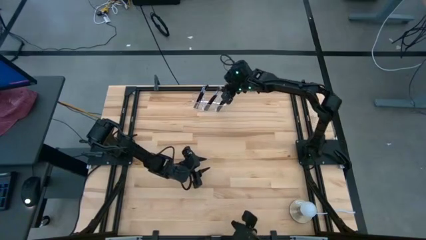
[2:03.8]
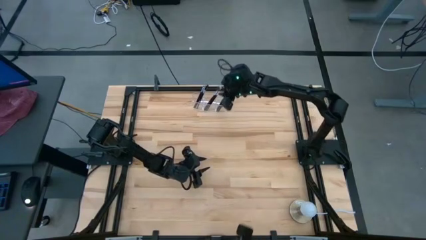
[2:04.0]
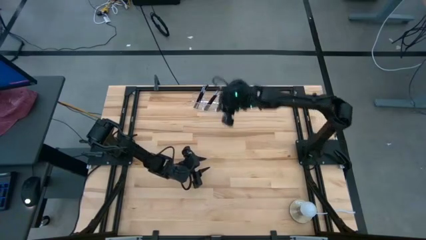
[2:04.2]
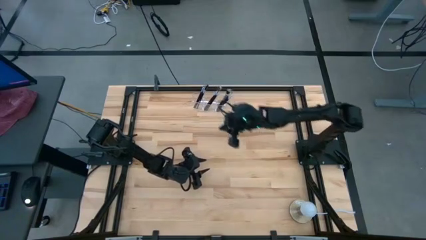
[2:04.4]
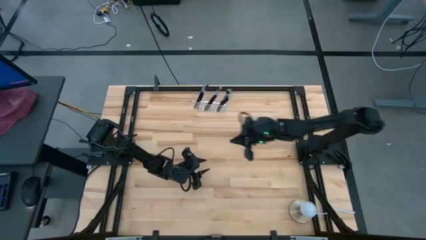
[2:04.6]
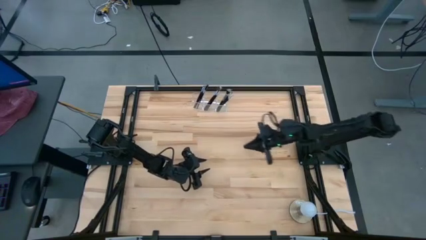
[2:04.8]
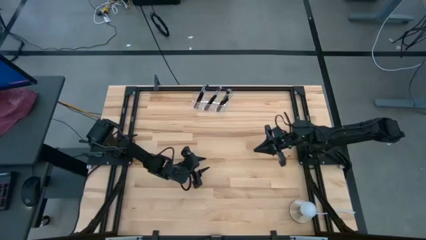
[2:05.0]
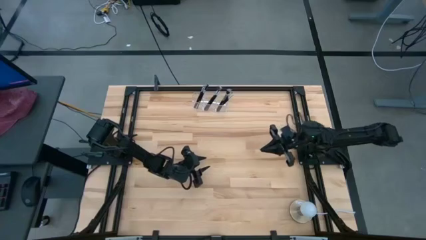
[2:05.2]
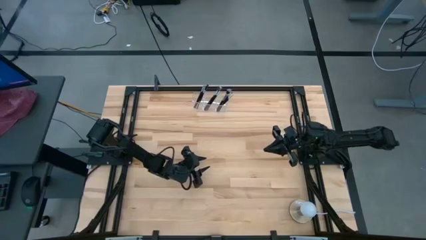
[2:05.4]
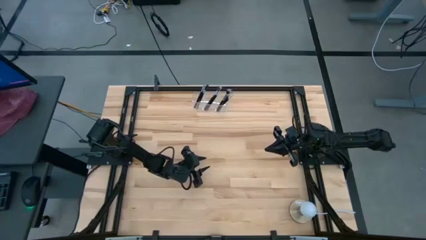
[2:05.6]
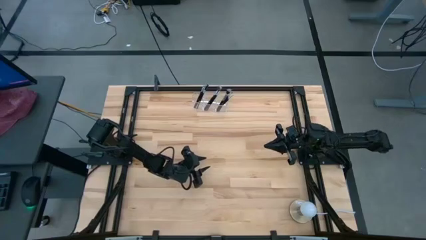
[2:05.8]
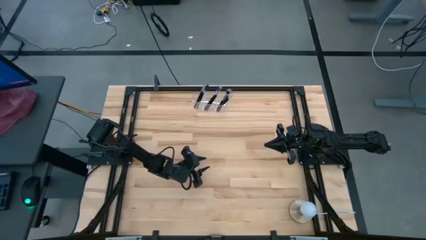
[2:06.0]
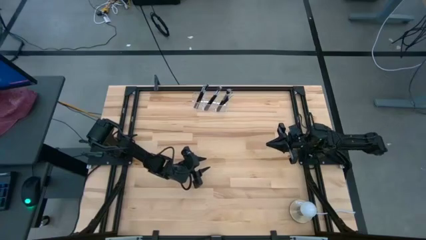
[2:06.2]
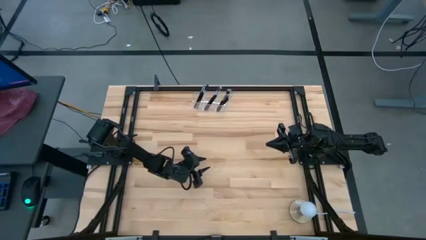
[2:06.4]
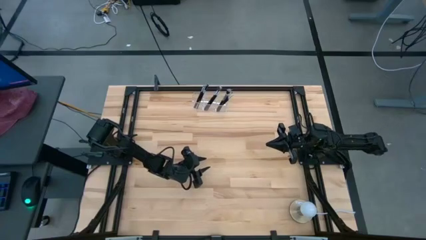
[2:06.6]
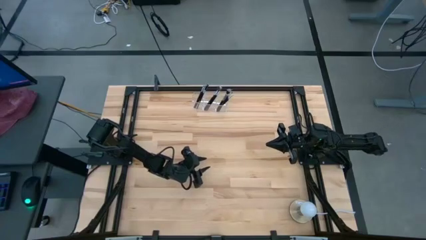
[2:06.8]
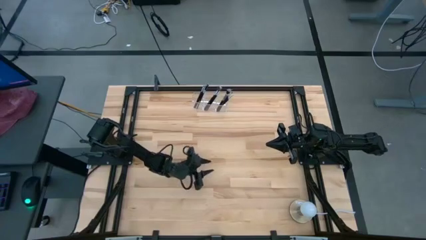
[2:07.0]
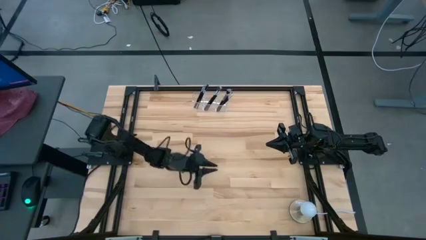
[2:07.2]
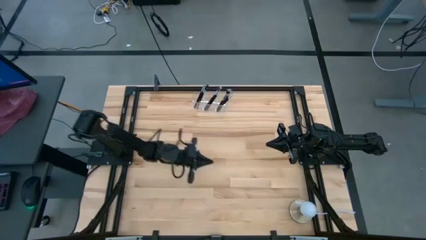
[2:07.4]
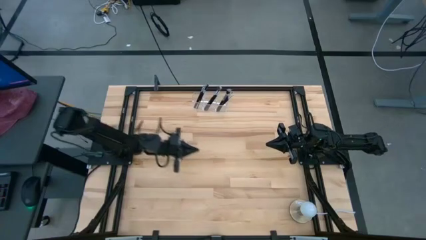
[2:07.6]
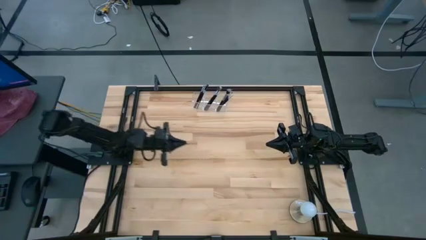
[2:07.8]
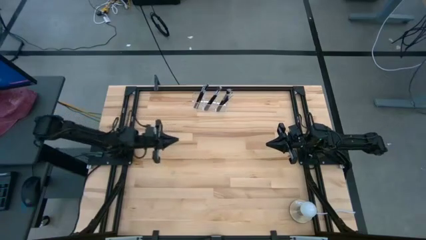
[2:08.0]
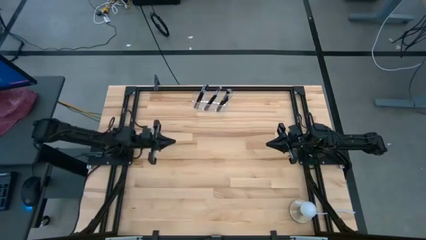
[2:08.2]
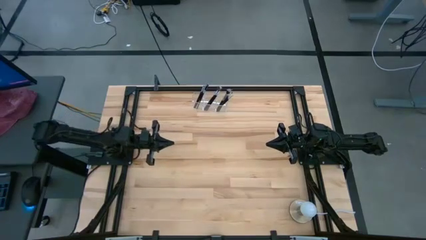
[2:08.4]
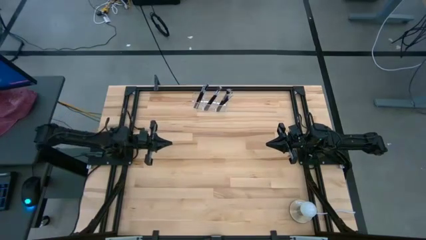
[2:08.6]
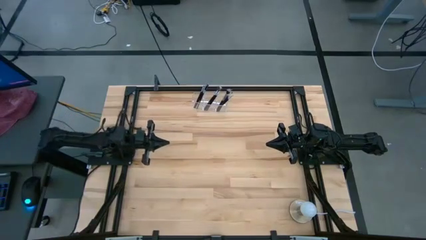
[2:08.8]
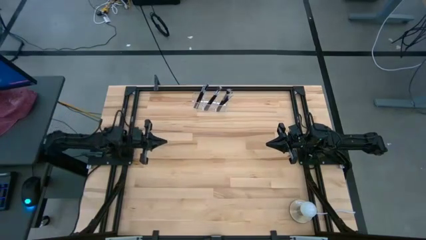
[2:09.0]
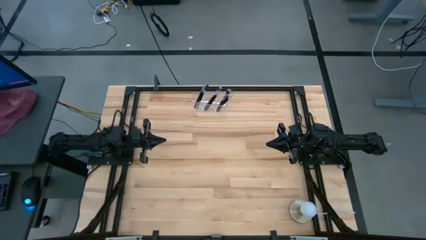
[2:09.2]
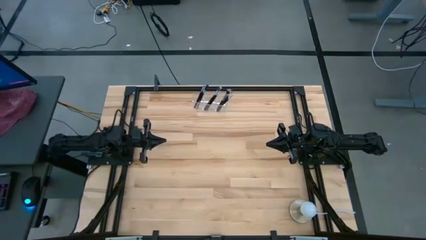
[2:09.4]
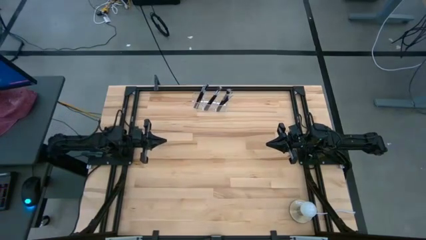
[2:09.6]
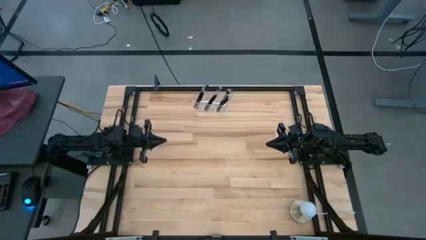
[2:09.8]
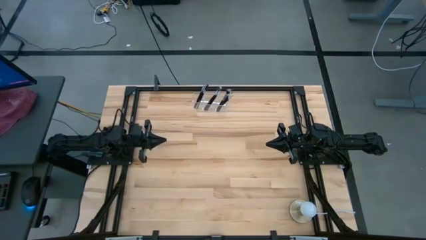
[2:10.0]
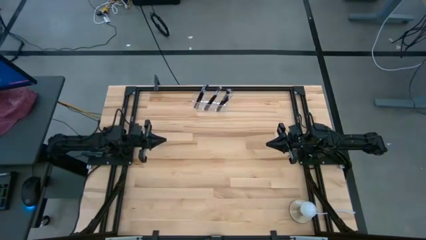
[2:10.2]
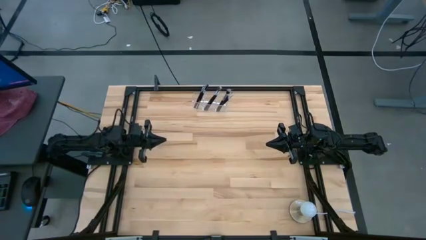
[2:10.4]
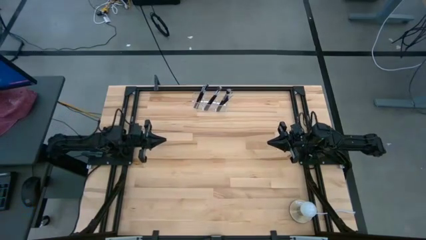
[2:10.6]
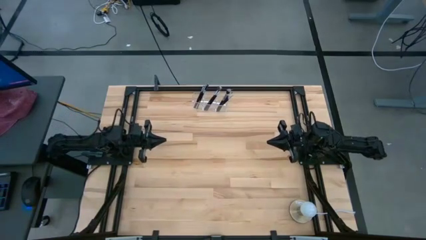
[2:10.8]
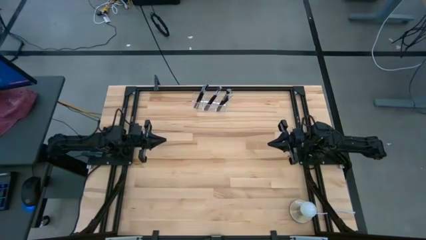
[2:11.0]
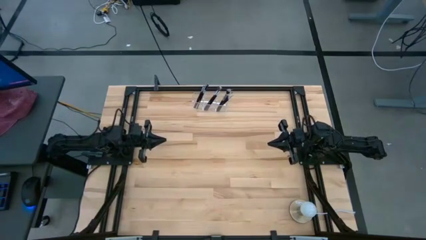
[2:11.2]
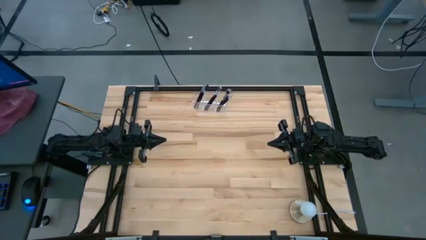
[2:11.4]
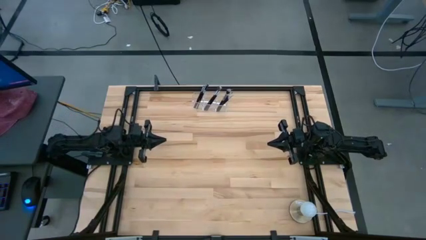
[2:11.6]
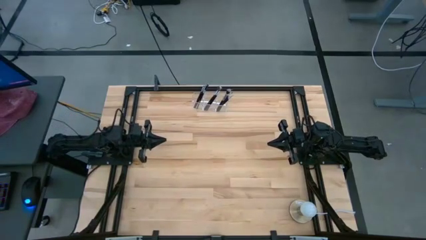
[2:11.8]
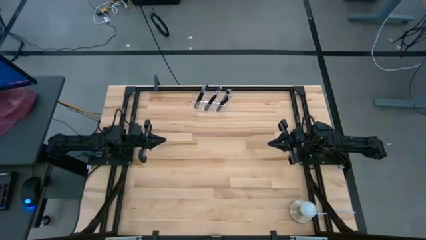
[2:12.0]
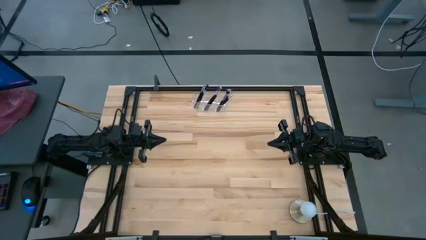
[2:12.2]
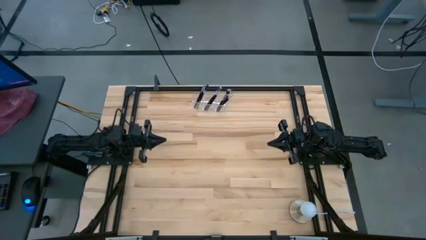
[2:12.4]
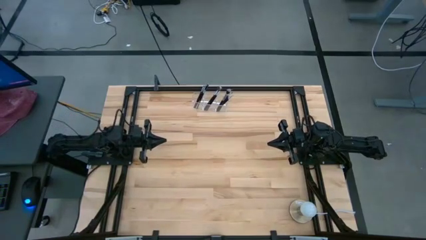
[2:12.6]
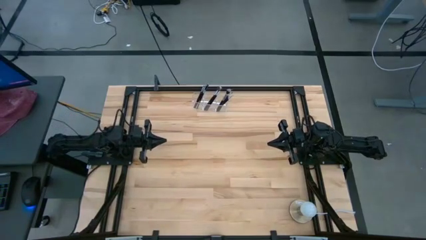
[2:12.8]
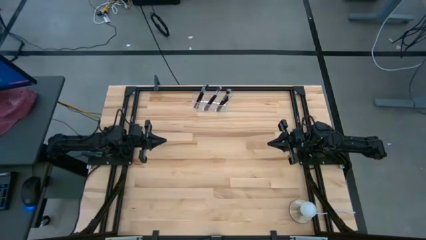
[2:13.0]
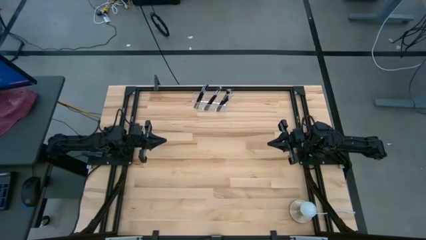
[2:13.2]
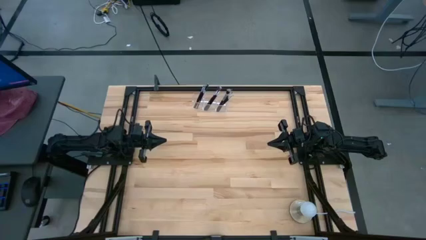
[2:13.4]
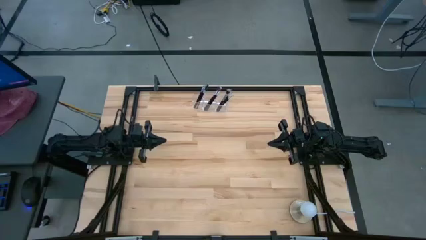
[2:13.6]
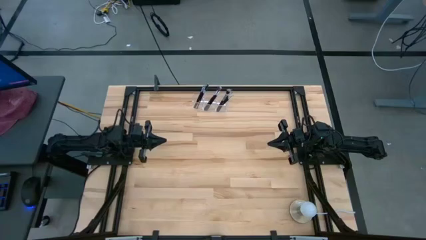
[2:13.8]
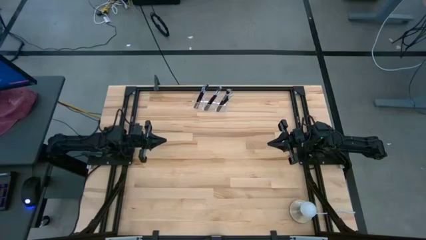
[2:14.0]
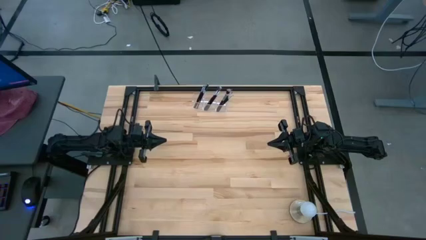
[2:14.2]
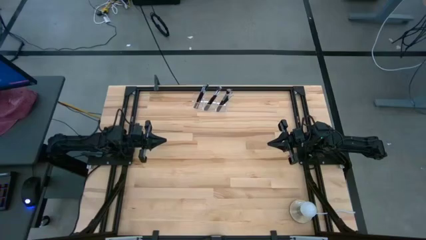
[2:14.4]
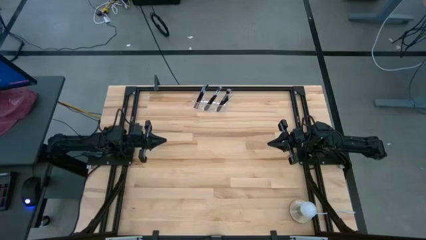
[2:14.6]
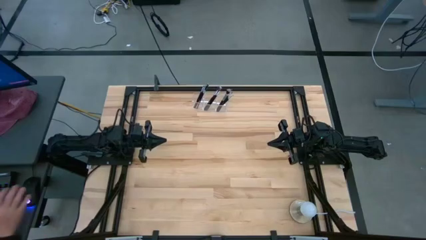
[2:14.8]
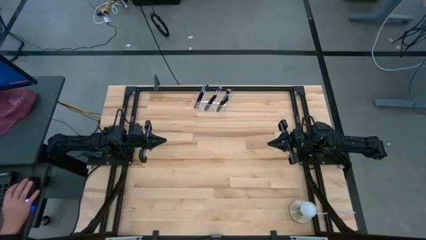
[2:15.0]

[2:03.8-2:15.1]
Task: Put items in baskets/containers
Return to Home Position

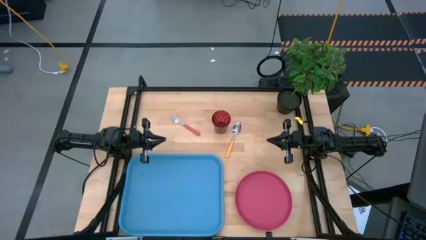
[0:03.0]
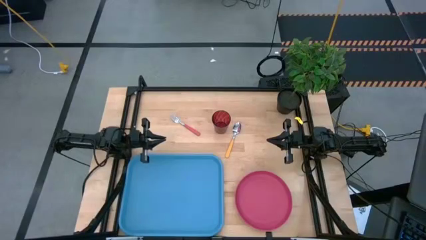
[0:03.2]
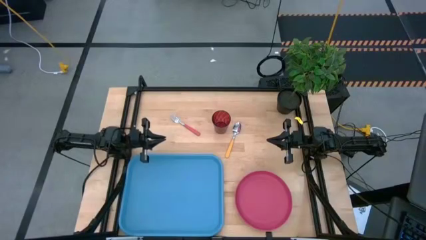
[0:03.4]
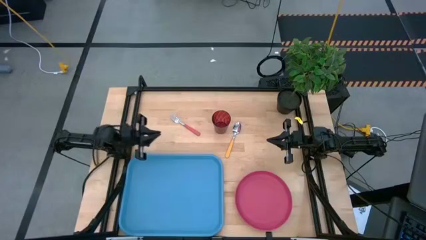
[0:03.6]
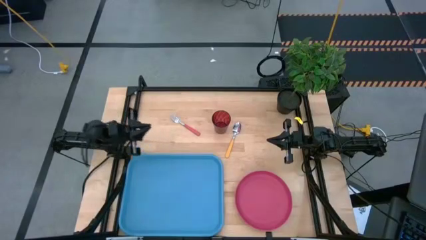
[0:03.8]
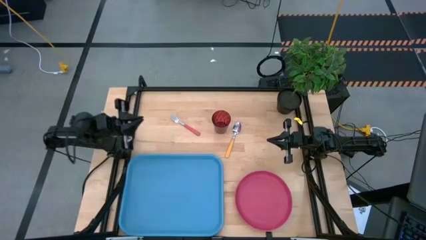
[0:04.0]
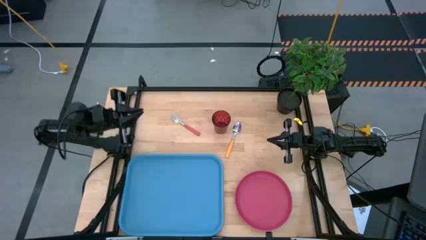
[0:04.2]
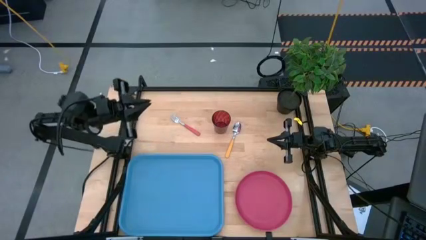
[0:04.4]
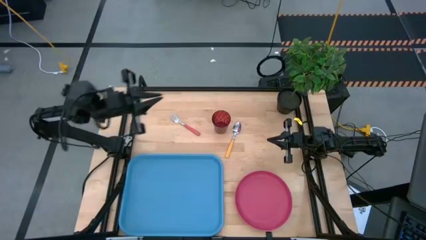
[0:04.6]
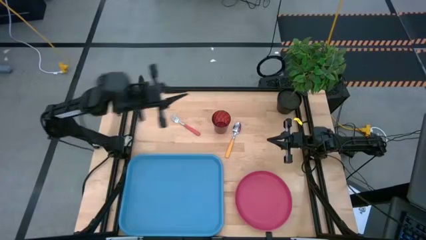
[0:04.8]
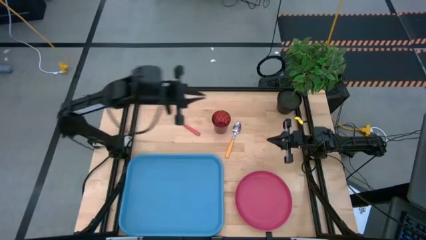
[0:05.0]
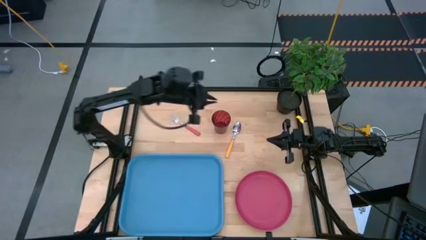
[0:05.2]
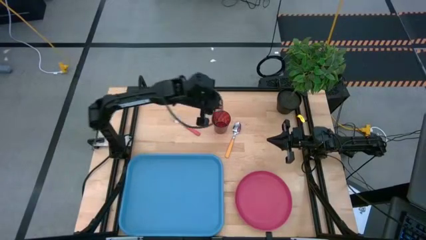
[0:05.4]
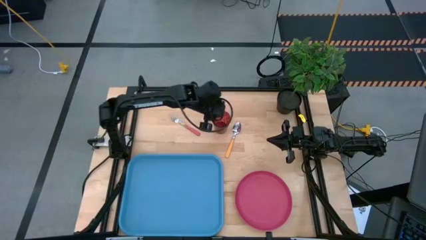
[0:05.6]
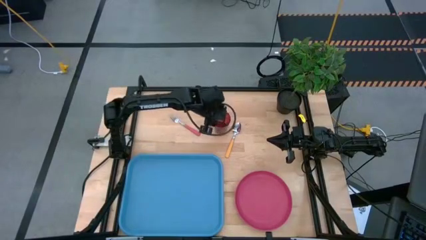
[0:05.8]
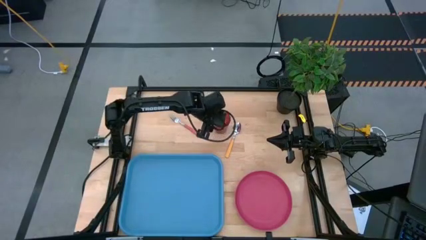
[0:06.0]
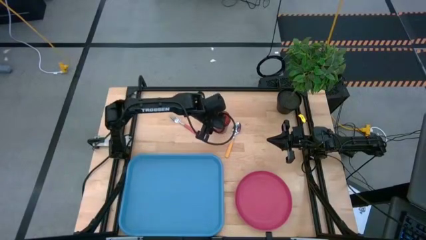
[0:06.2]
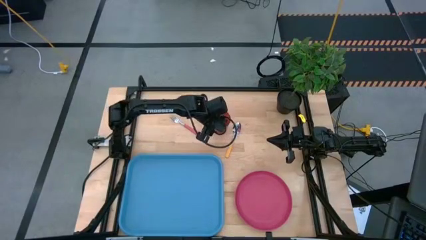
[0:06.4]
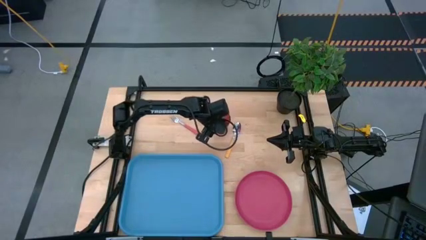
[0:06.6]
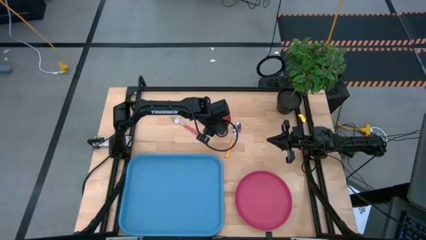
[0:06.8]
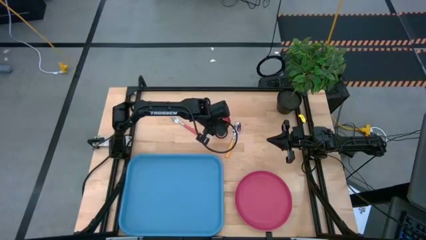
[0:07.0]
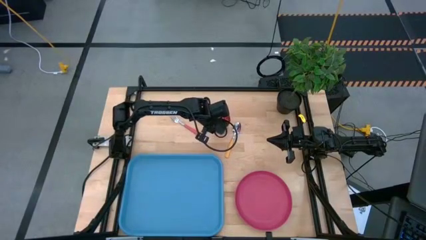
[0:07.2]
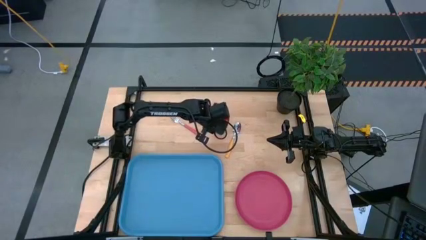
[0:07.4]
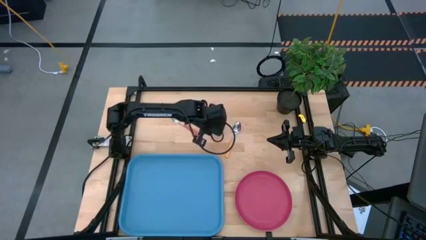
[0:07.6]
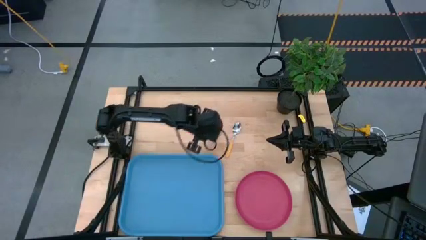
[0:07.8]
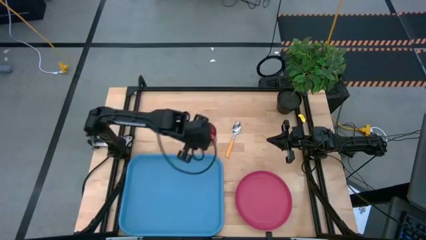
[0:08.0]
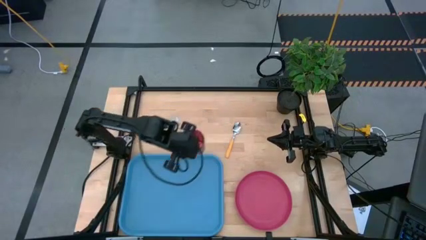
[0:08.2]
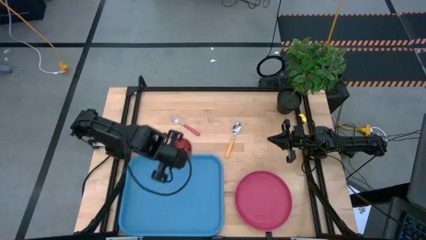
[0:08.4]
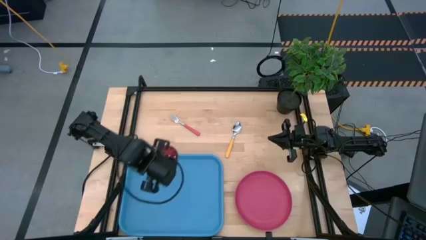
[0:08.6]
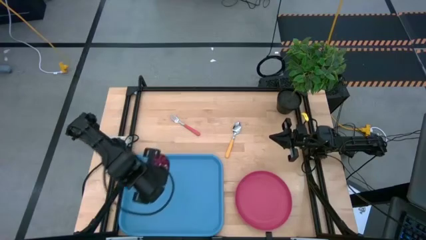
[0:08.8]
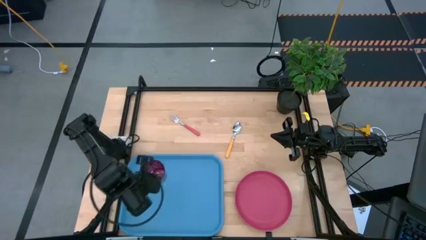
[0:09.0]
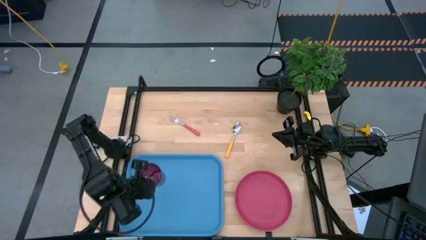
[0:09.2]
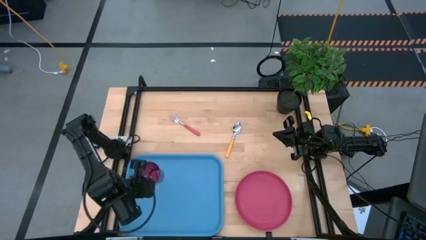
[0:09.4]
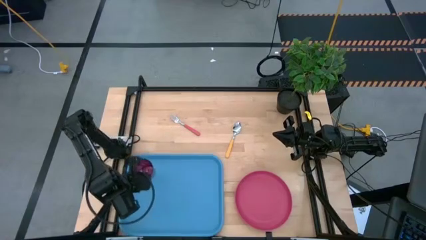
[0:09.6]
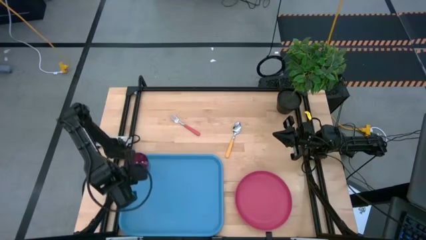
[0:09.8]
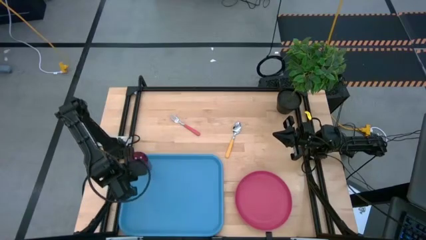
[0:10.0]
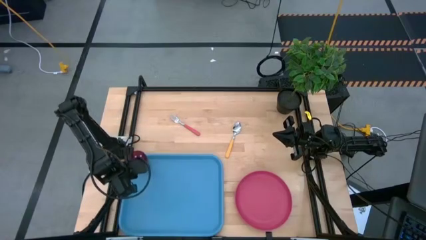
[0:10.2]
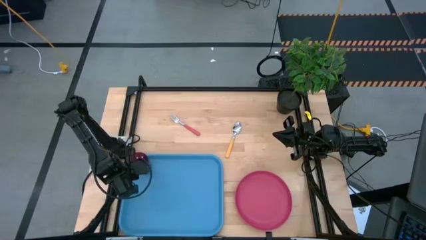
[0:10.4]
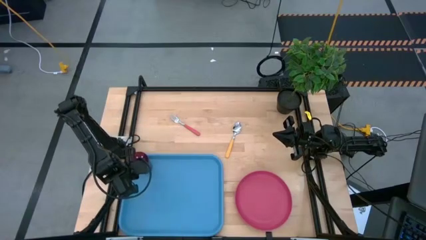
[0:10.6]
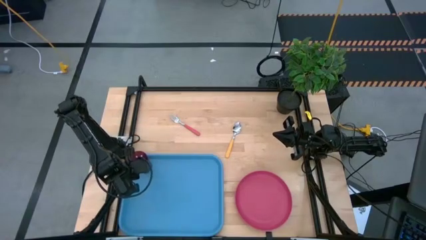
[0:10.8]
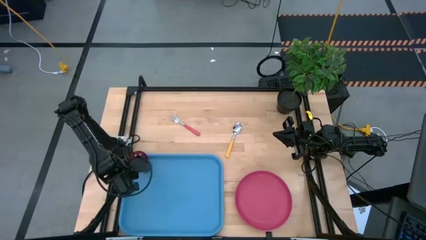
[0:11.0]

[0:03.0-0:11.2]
Task: Pick and place plate/cup/fork/spoon on tray
Put the red glass on the top left of the blue serving tray
